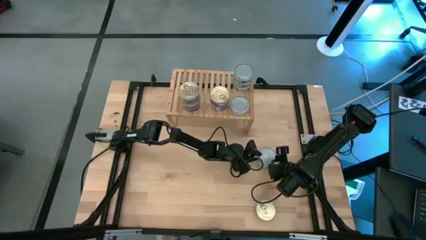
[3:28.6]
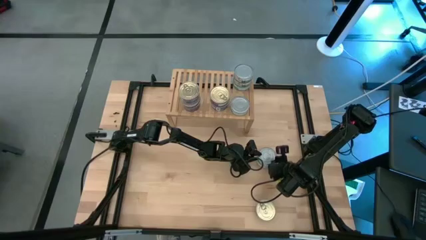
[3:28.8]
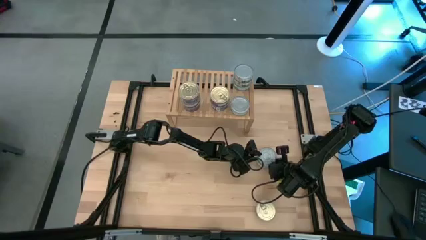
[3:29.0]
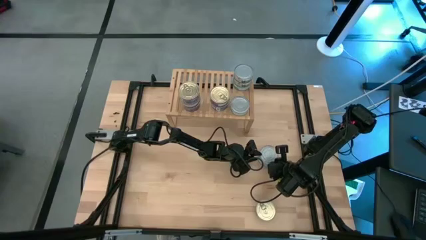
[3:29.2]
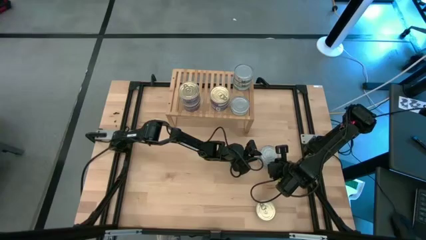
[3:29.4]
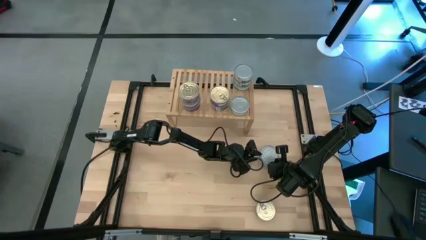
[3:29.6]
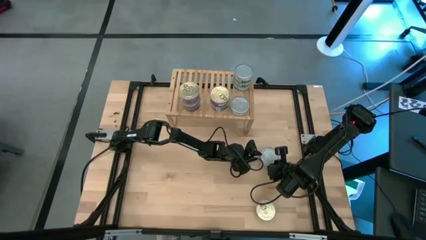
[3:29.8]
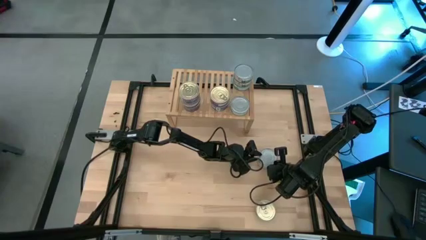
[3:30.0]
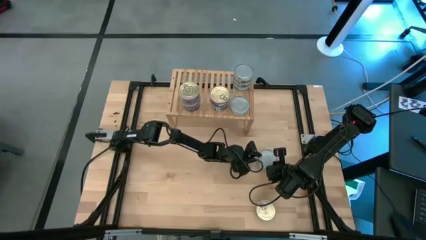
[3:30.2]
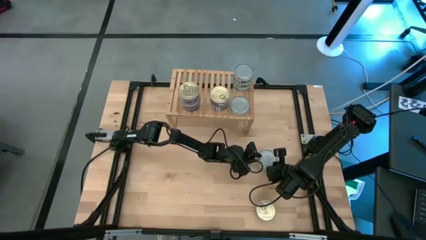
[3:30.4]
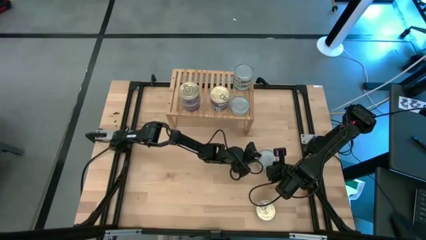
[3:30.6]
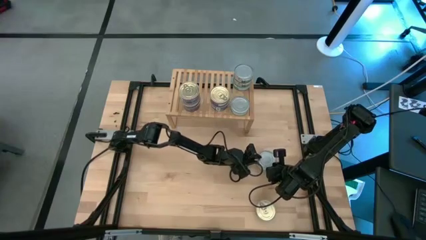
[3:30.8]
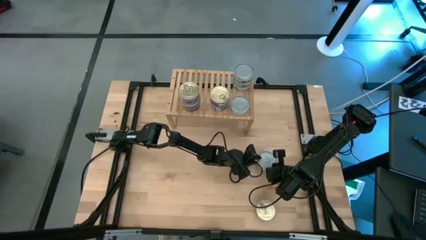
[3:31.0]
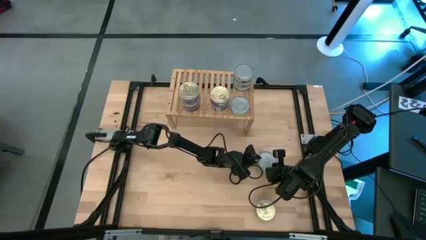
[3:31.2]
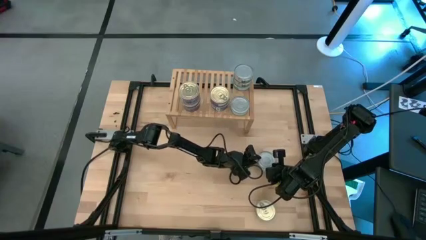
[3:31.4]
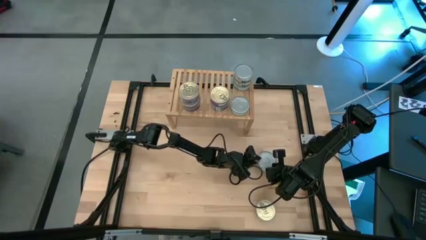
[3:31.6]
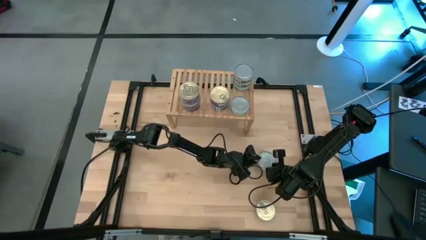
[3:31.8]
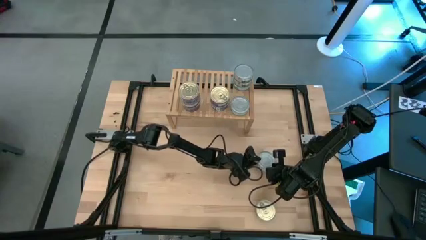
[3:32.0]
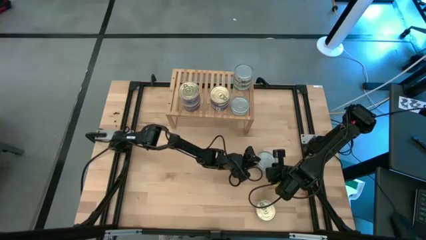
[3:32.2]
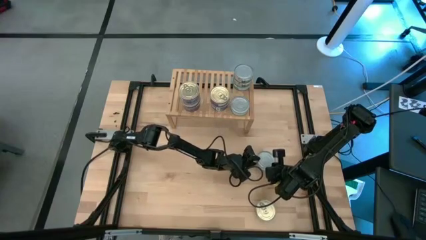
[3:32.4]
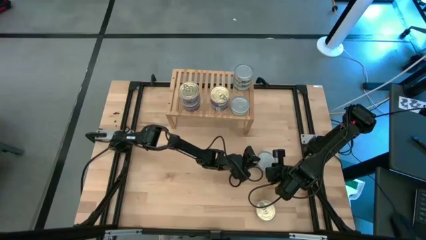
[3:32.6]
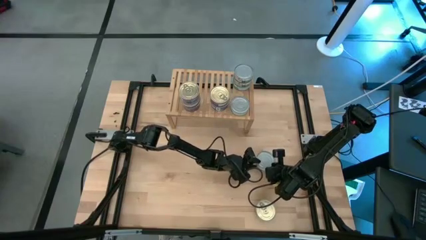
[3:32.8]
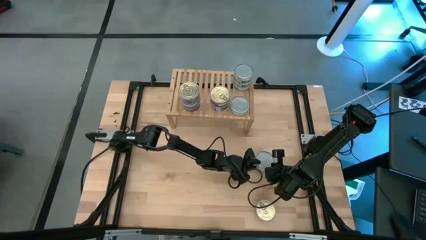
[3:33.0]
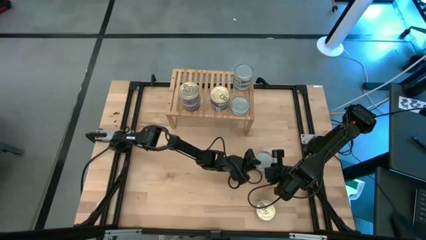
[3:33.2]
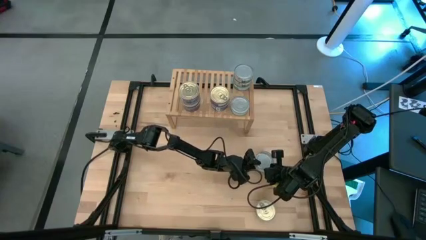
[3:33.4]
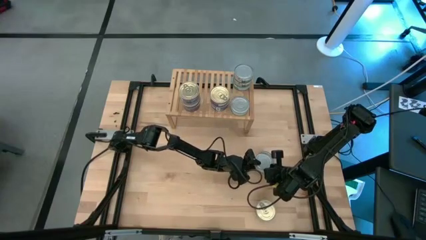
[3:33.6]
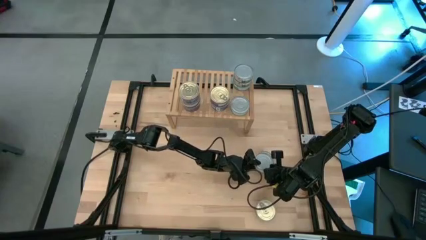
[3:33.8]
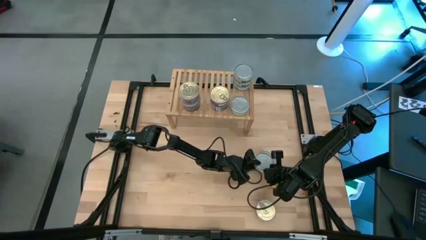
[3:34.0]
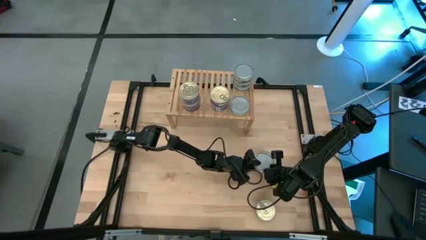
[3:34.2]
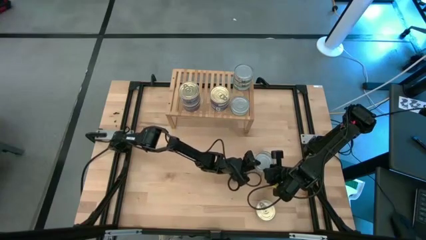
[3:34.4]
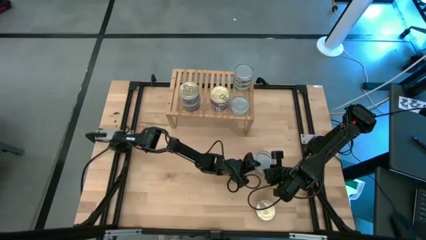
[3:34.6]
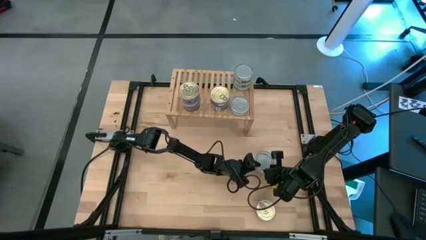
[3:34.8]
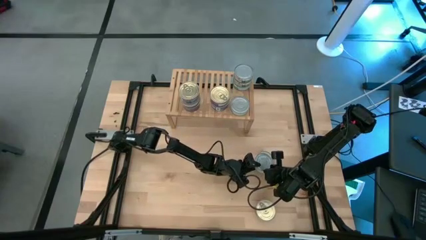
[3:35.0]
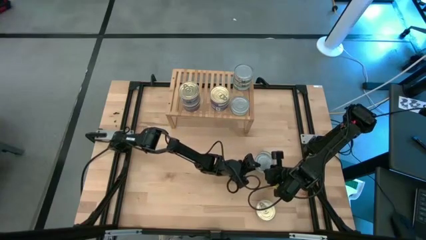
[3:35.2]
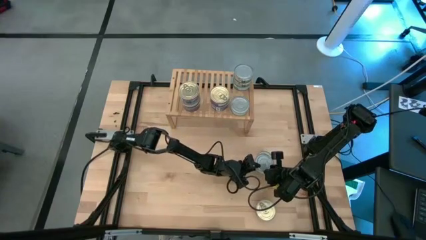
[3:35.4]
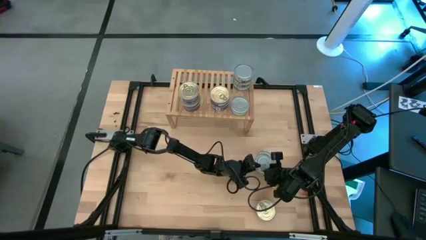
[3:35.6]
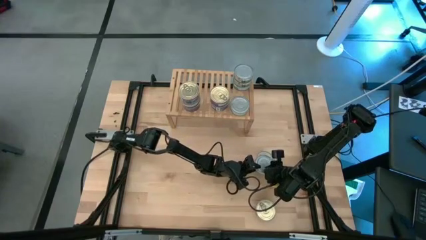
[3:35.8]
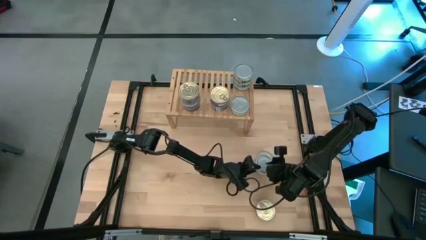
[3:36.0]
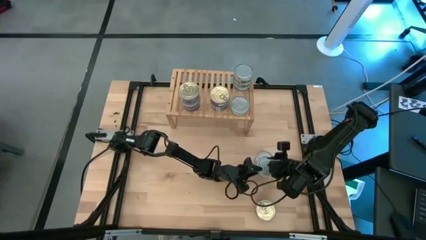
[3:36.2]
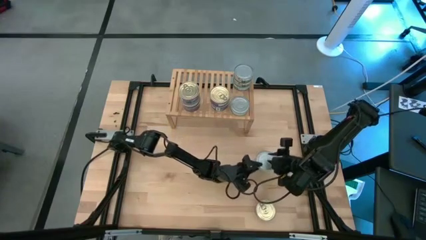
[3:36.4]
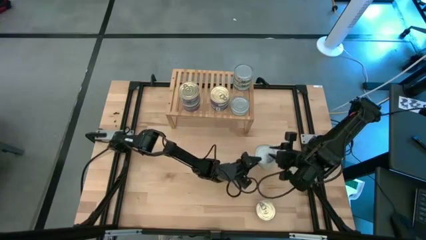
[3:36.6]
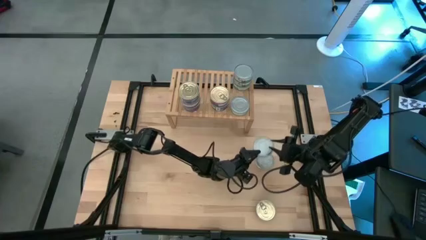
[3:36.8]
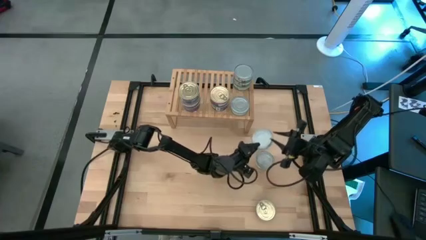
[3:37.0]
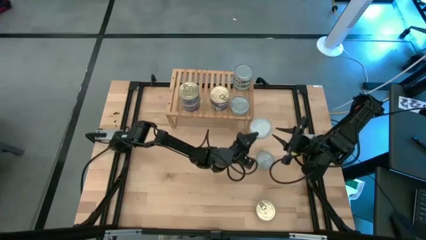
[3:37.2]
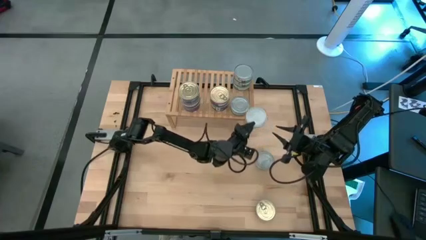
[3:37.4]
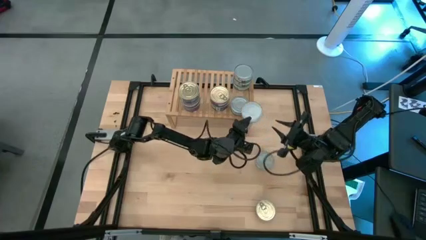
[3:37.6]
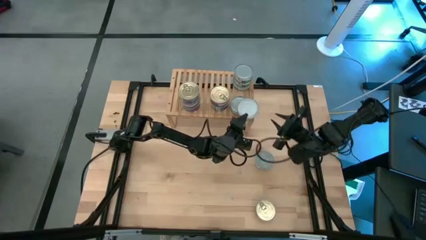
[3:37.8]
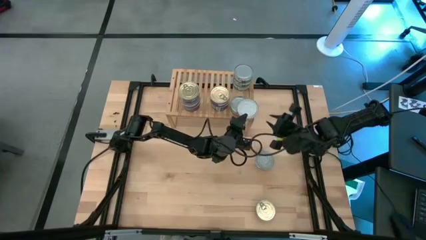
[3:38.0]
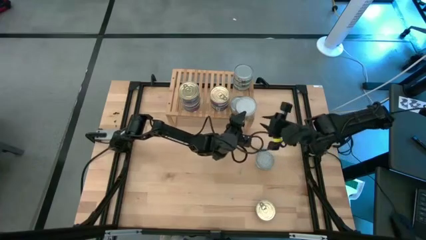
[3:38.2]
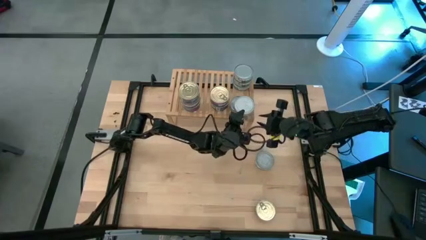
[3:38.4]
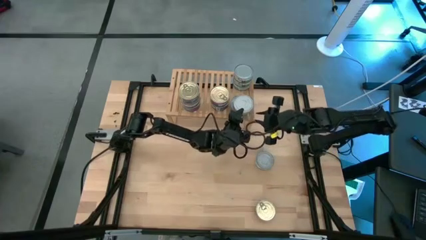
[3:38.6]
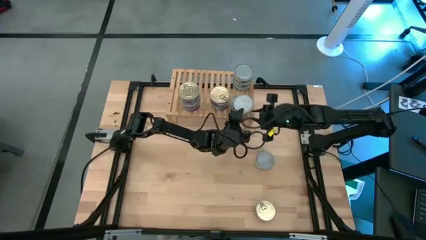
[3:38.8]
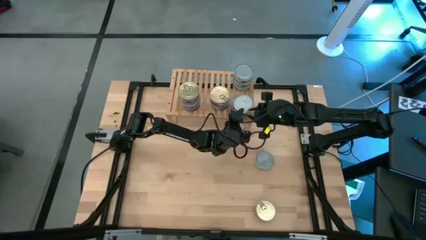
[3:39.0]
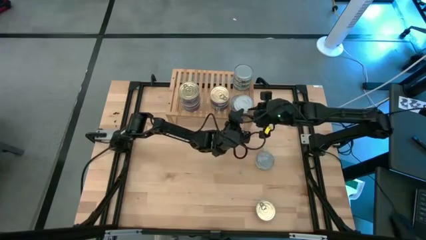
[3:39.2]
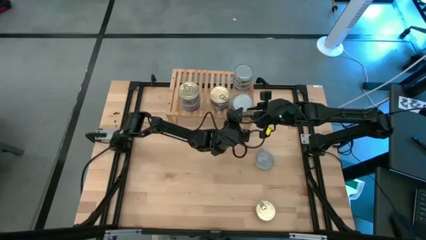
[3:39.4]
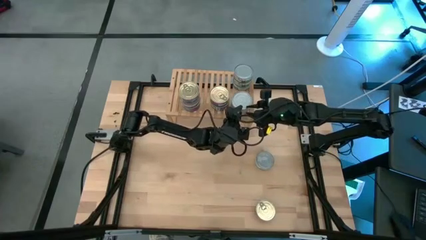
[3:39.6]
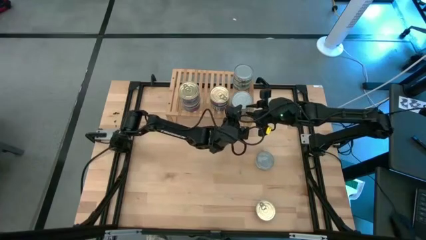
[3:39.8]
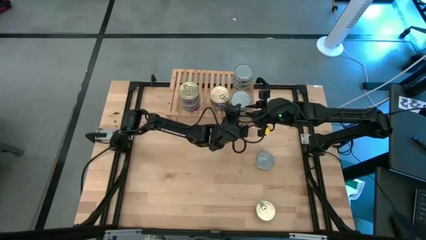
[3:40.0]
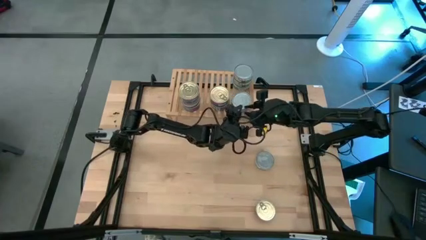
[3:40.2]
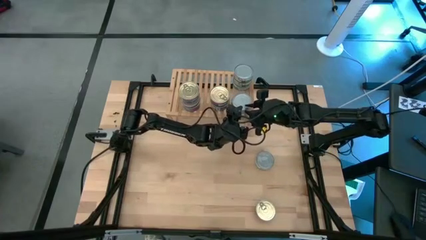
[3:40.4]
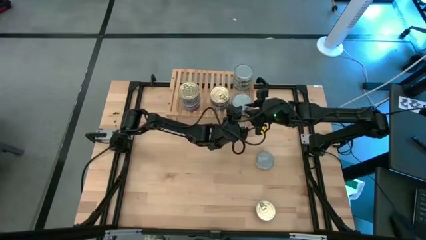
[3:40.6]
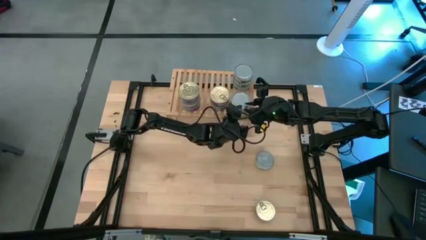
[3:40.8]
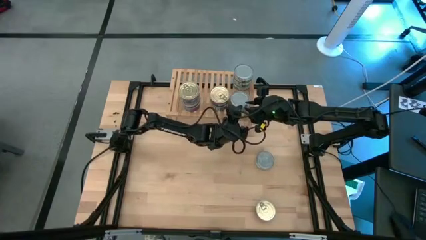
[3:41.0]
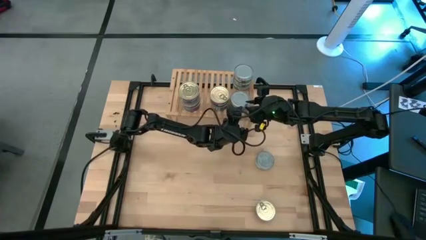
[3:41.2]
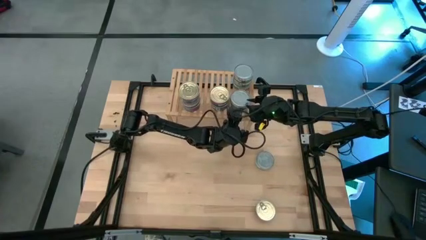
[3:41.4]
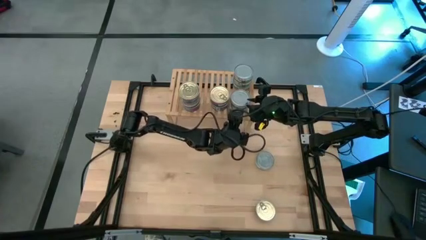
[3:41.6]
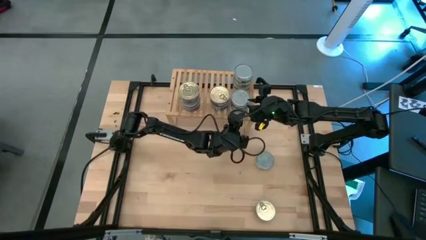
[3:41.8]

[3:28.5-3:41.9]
Task: Stack canned seafood by type on shelf
Stack the green tuna can on top of the green tuna can on the shelf
